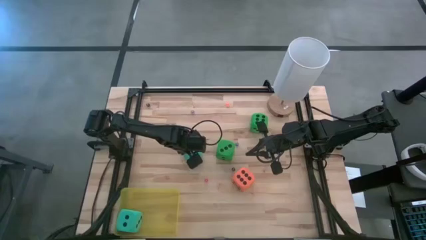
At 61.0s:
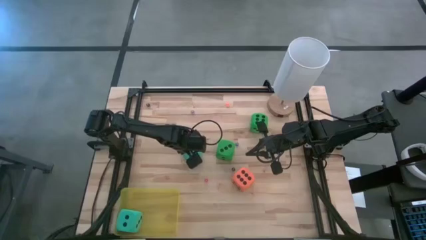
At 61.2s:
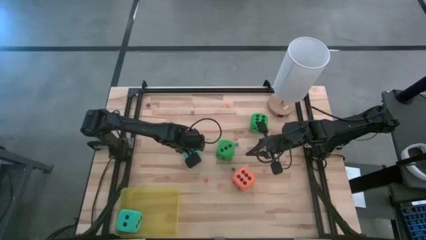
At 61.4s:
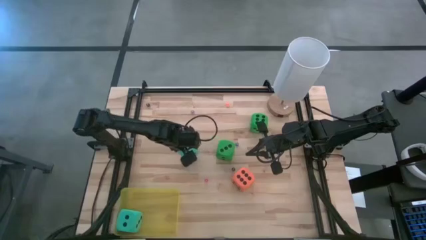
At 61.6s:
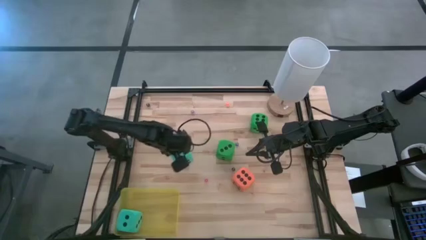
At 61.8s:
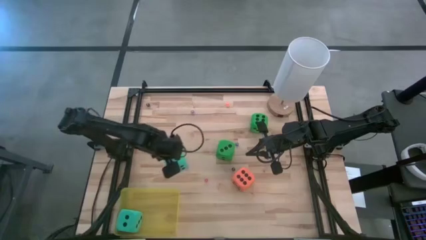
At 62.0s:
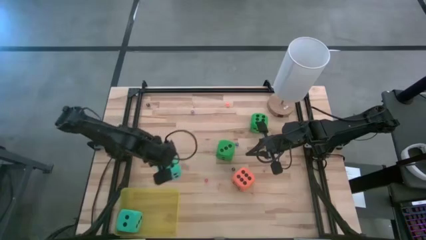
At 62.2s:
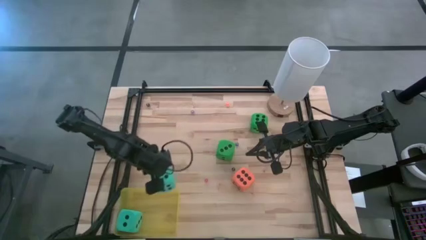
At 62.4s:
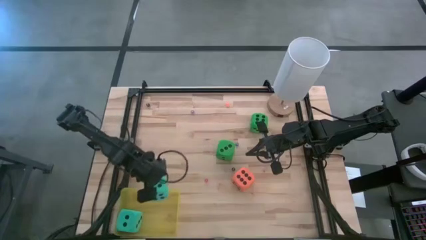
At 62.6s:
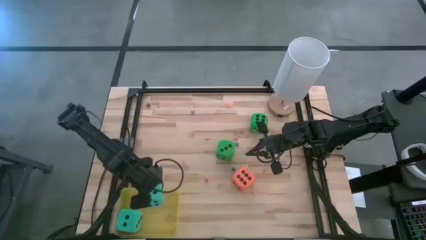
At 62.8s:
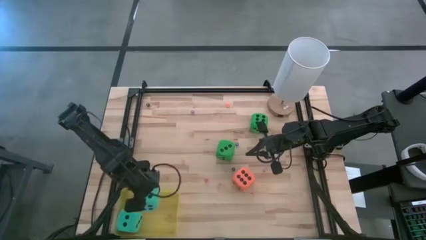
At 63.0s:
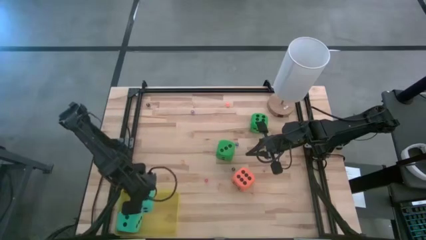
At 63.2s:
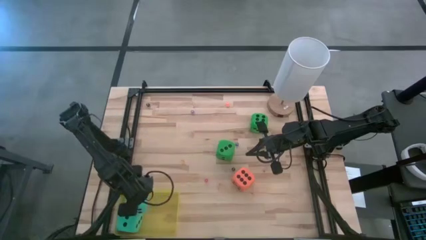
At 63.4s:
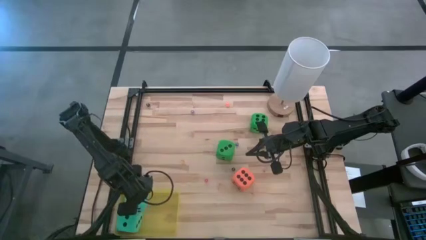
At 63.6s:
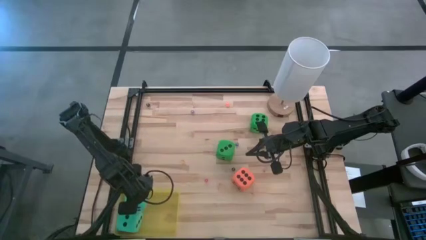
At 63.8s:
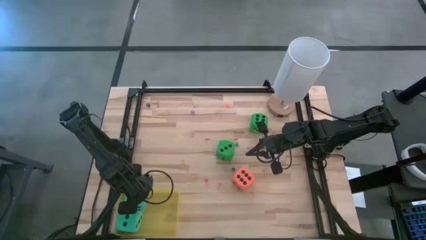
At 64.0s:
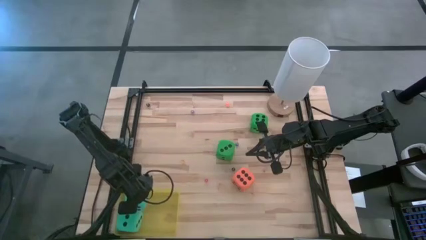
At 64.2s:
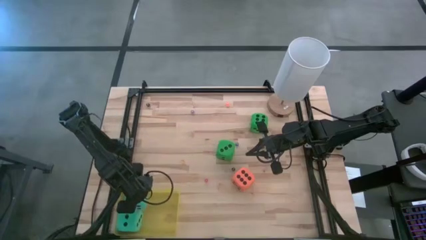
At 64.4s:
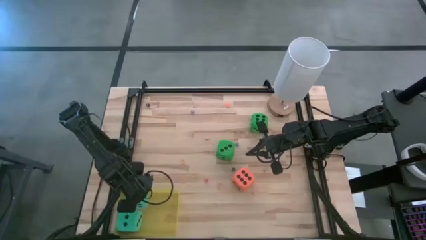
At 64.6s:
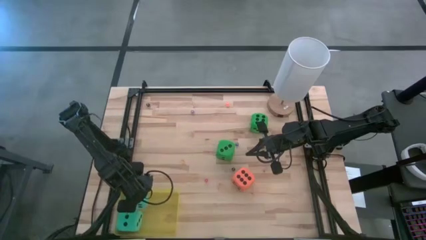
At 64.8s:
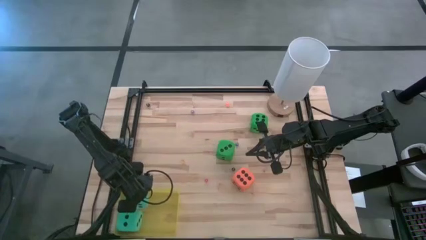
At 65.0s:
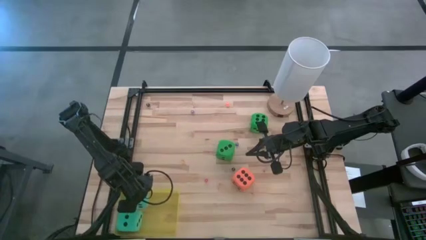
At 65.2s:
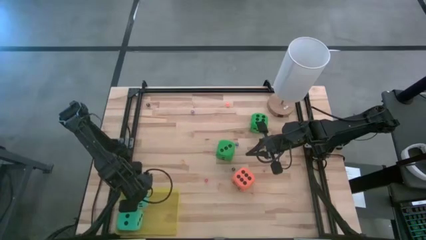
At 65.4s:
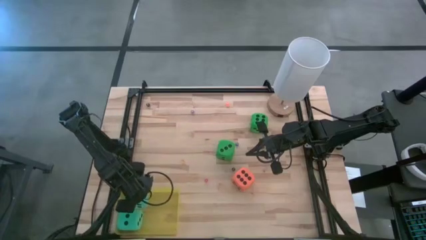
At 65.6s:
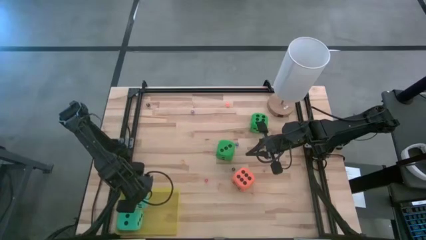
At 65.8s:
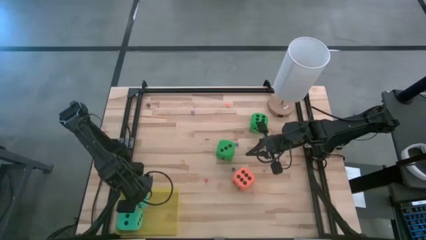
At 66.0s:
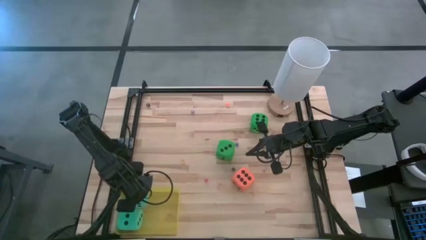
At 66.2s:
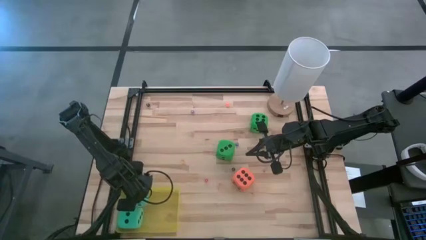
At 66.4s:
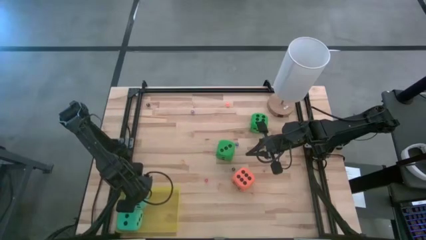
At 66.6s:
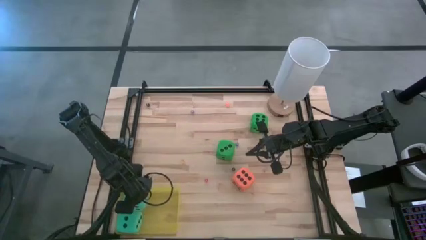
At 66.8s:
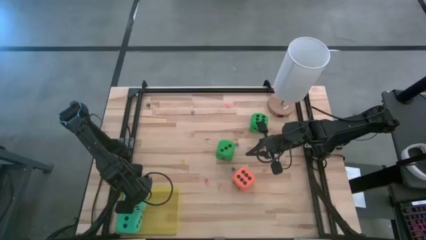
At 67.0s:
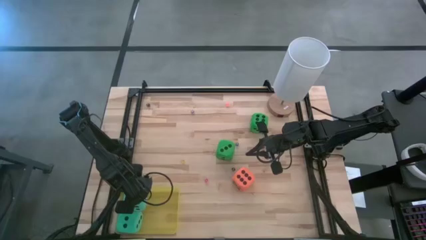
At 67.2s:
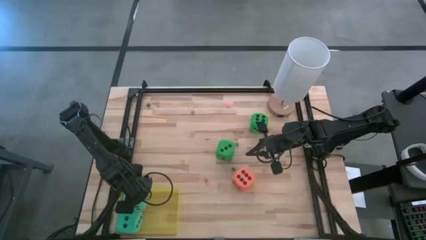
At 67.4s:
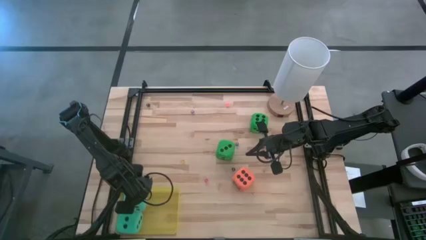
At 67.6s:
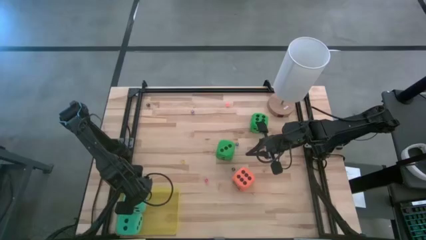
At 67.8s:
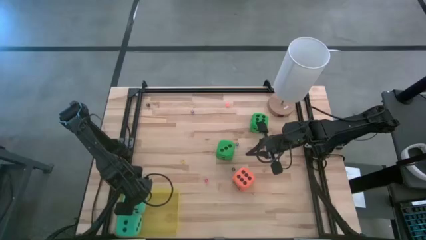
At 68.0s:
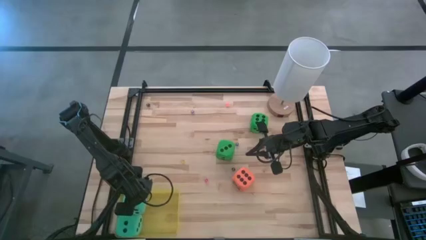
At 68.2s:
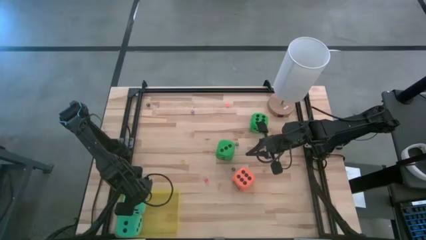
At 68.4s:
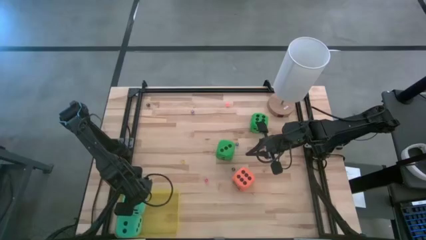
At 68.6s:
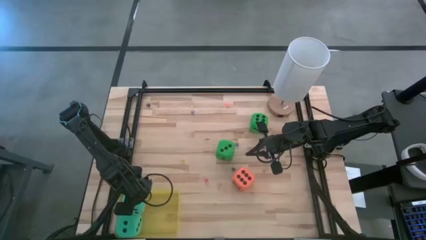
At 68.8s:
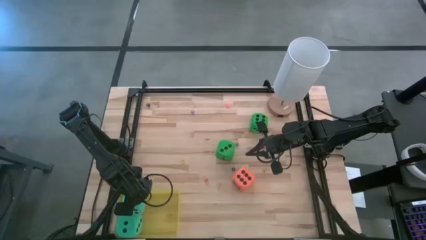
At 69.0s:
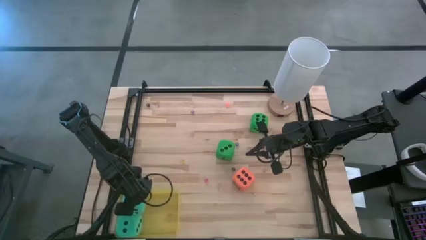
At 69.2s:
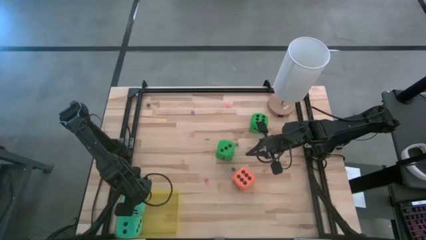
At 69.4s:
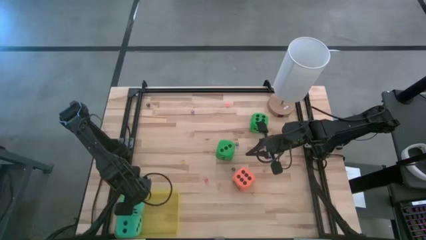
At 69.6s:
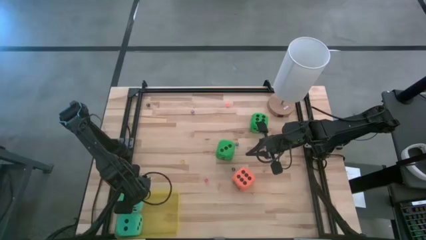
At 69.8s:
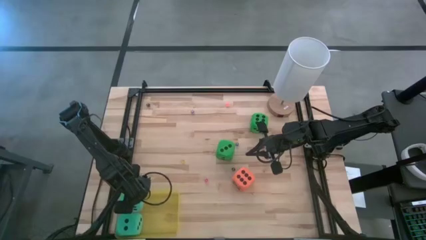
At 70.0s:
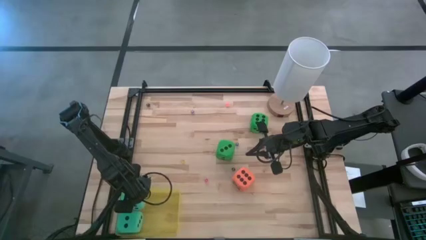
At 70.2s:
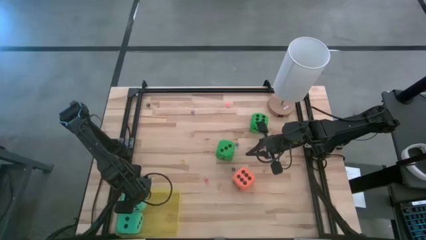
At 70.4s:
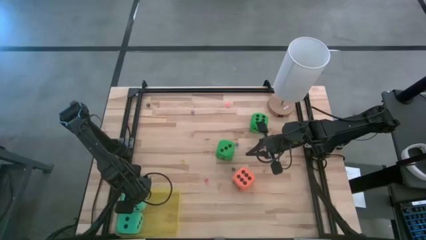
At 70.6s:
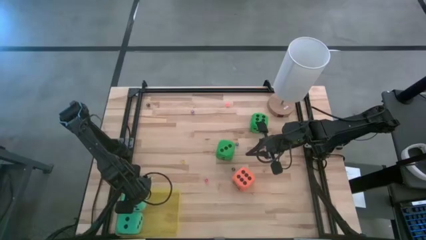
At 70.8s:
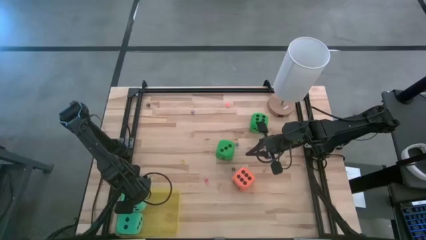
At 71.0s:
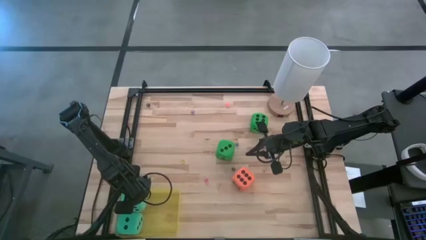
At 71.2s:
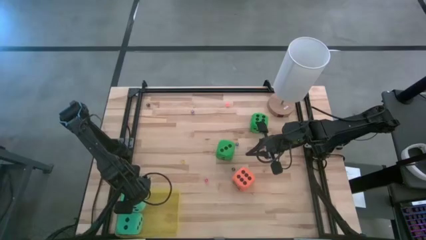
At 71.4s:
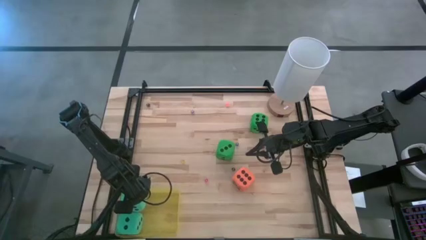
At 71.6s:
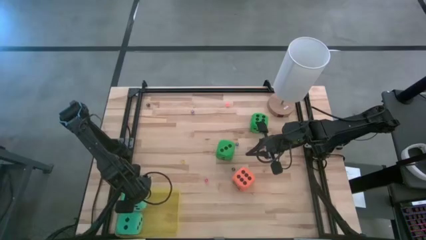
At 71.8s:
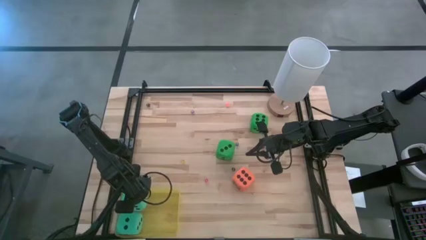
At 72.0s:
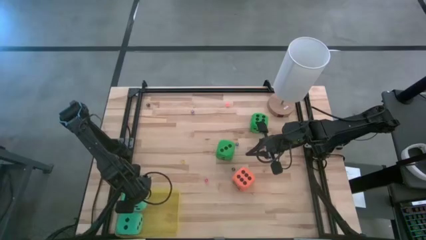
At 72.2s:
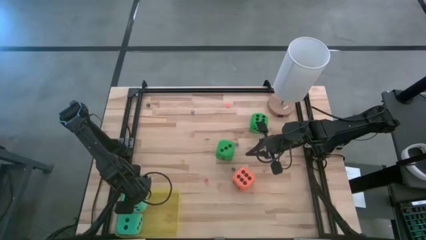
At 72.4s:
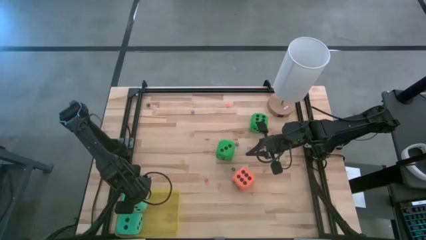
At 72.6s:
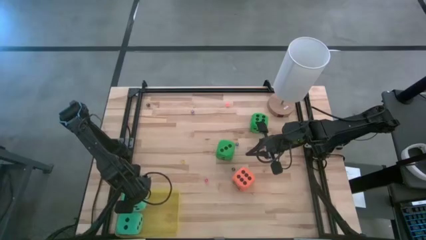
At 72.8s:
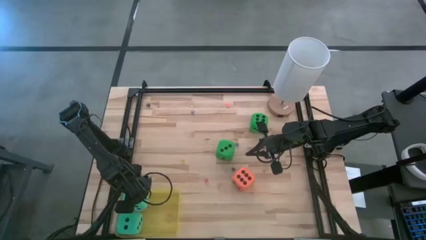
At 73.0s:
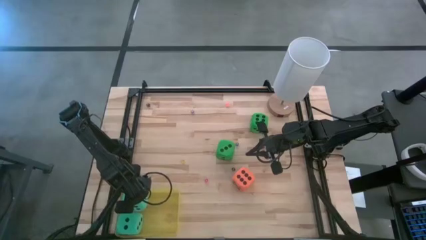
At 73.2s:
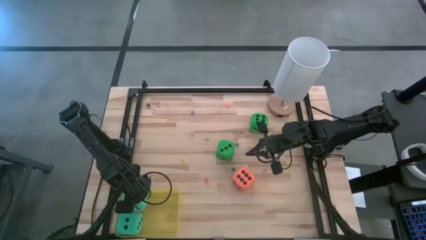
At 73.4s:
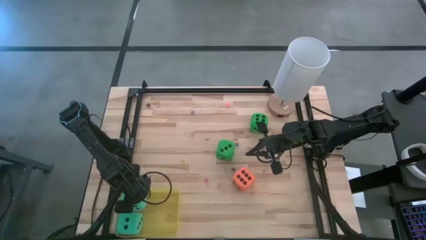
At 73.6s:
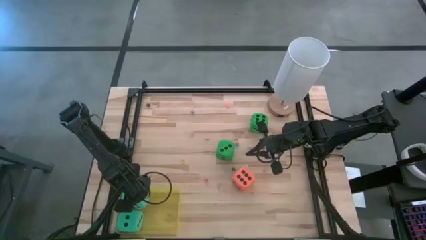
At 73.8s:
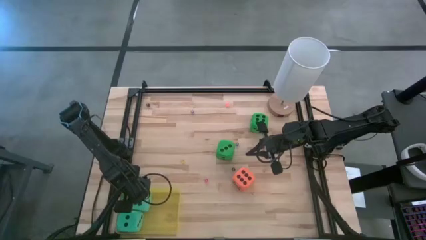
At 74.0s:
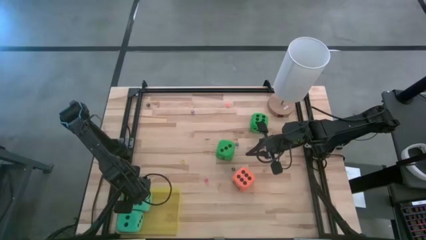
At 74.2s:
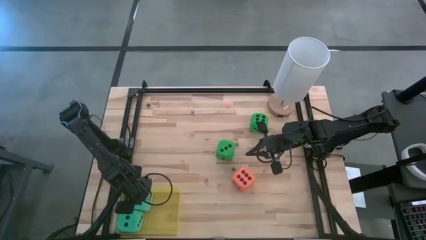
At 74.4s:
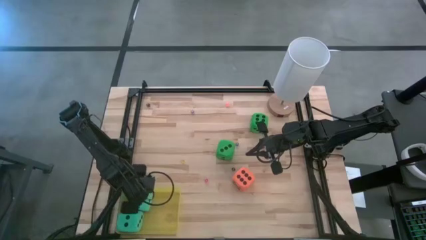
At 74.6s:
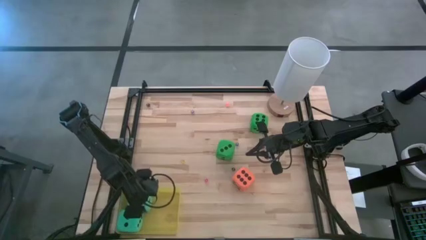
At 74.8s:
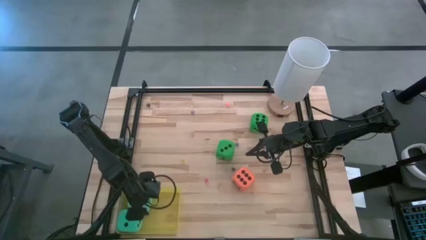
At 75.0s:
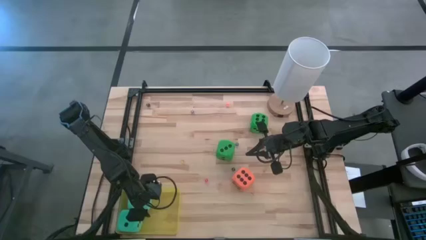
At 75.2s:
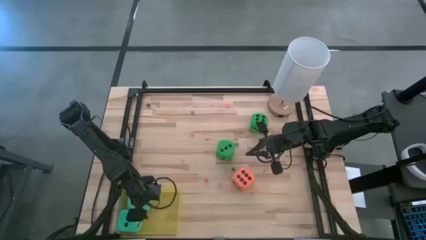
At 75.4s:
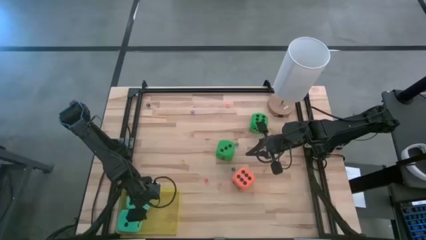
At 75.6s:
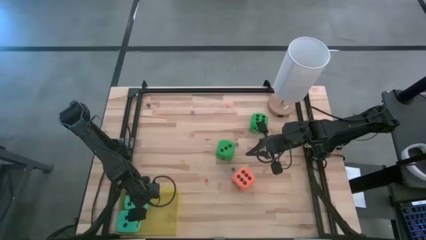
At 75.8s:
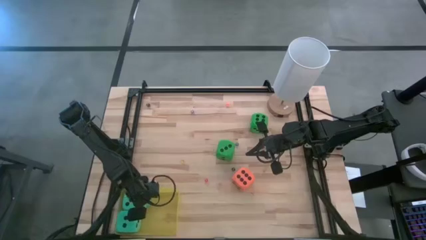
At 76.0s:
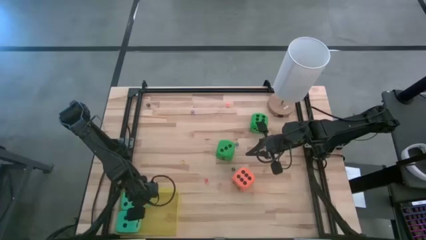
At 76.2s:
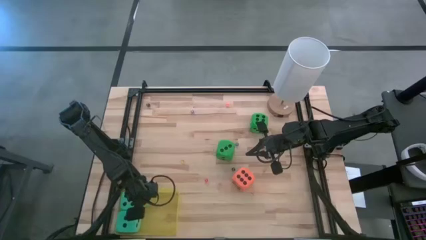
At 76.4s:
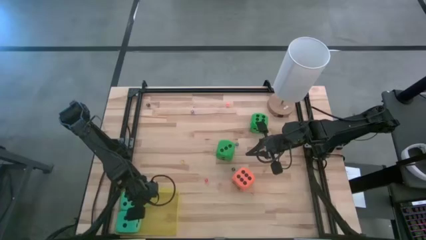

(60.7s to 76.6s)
Task: Pick & Place Dice
Put the large blue dice into the yellow bin
